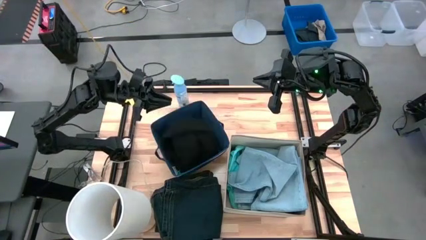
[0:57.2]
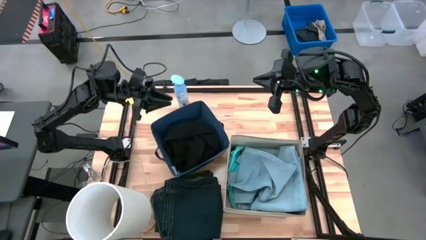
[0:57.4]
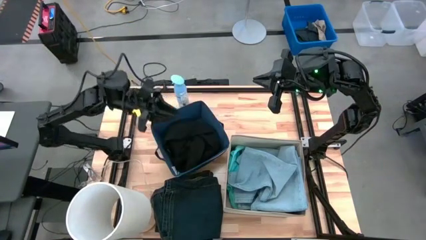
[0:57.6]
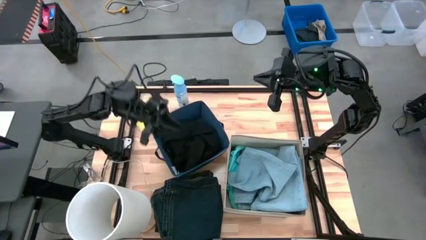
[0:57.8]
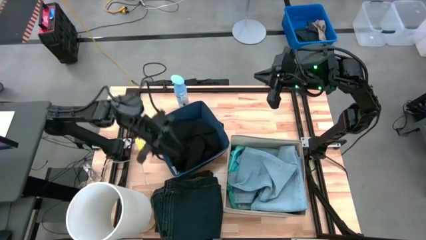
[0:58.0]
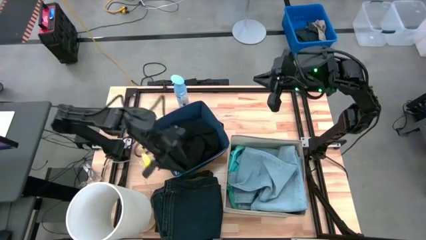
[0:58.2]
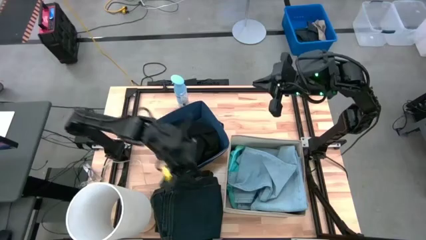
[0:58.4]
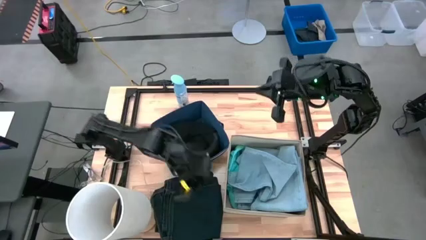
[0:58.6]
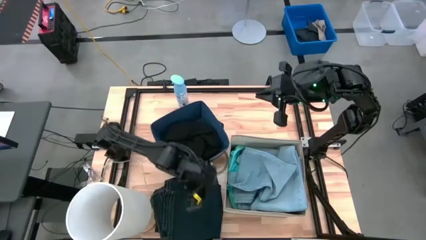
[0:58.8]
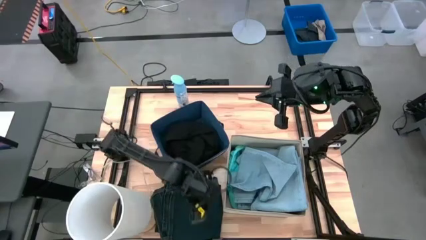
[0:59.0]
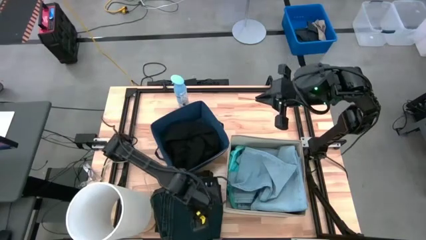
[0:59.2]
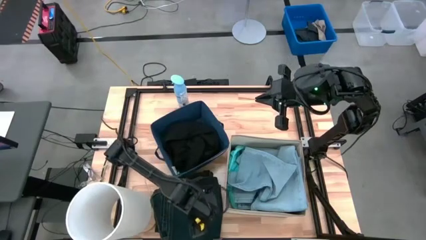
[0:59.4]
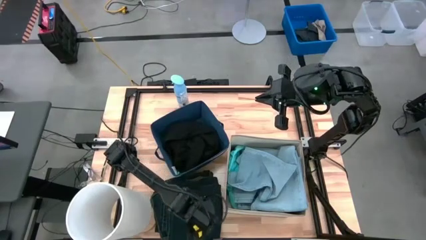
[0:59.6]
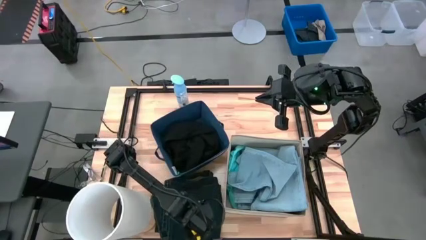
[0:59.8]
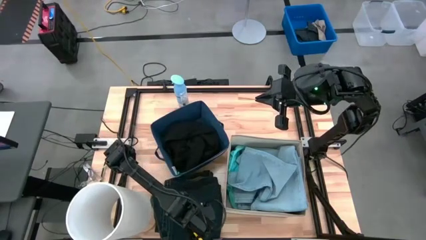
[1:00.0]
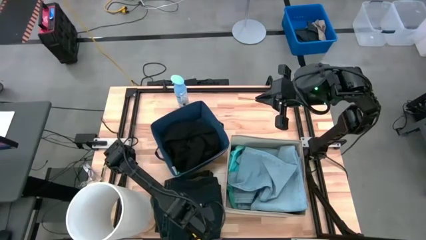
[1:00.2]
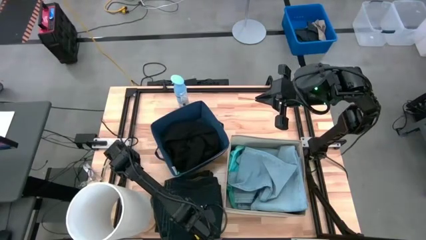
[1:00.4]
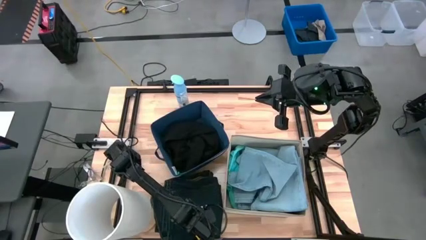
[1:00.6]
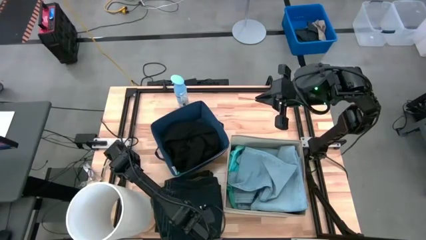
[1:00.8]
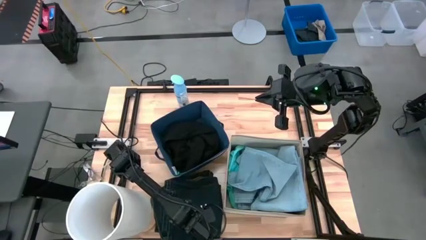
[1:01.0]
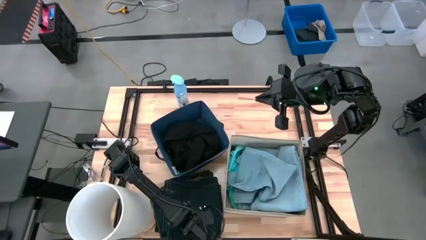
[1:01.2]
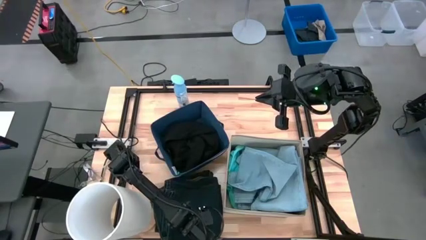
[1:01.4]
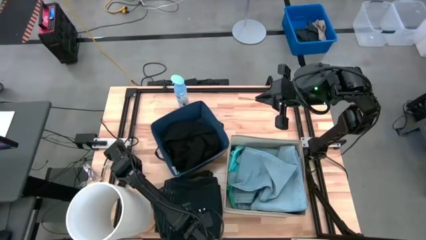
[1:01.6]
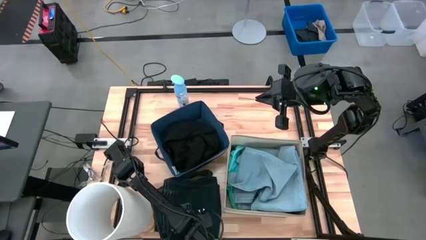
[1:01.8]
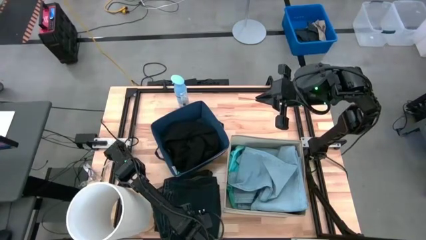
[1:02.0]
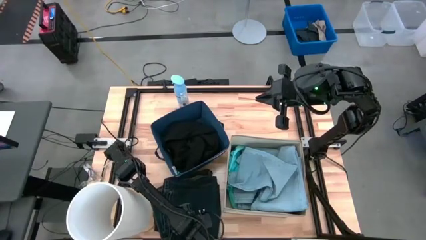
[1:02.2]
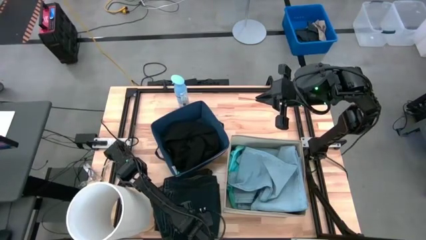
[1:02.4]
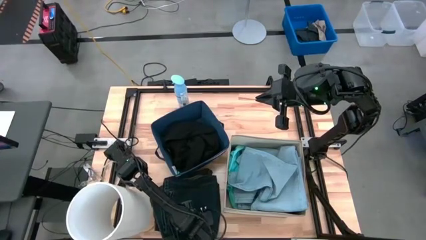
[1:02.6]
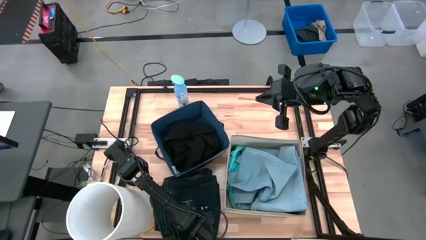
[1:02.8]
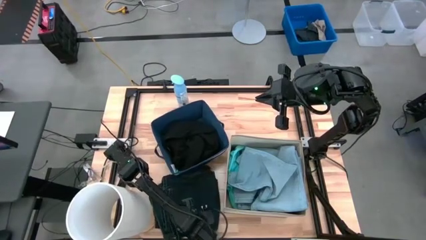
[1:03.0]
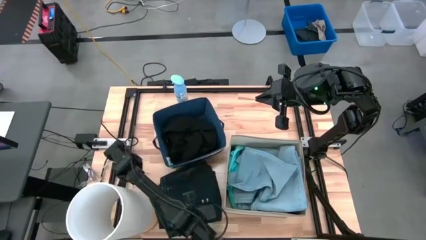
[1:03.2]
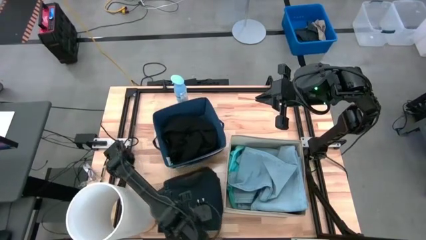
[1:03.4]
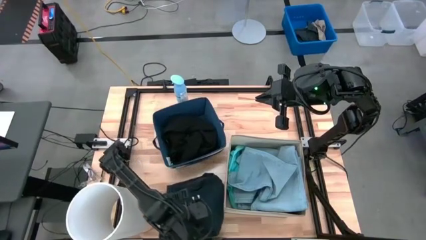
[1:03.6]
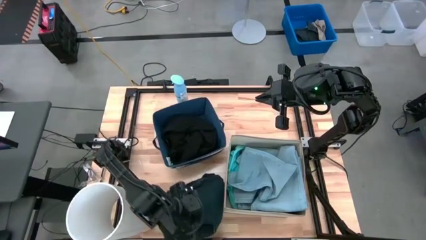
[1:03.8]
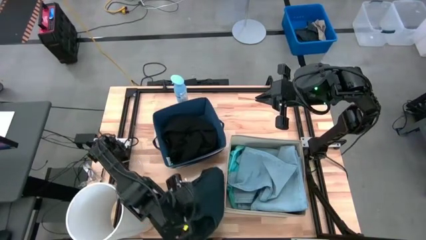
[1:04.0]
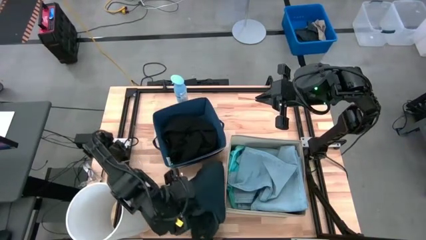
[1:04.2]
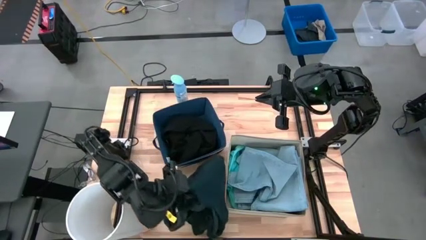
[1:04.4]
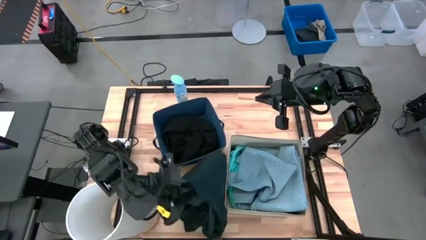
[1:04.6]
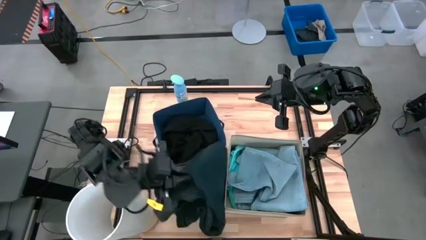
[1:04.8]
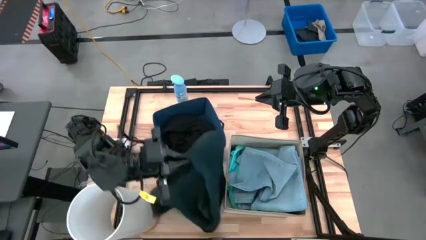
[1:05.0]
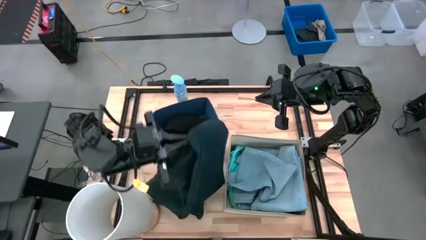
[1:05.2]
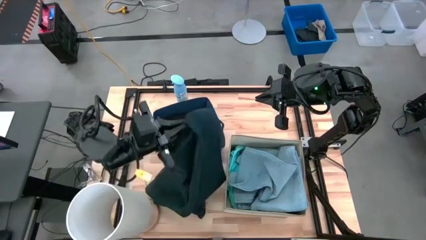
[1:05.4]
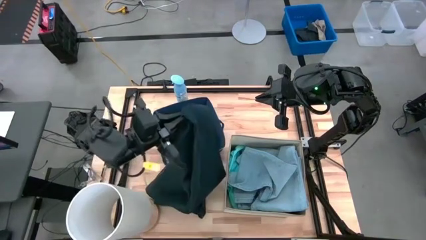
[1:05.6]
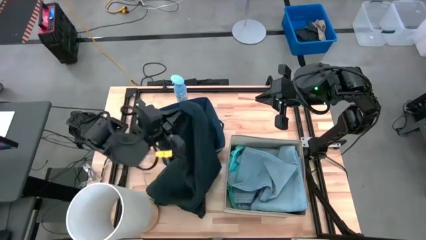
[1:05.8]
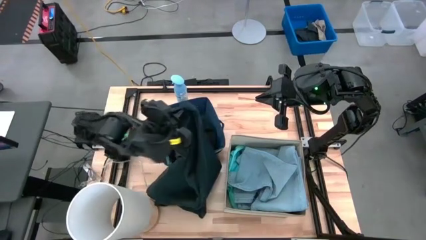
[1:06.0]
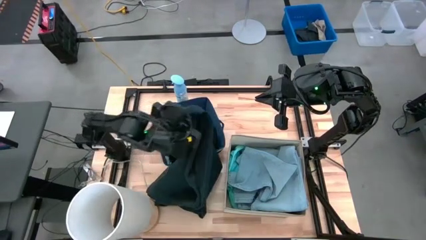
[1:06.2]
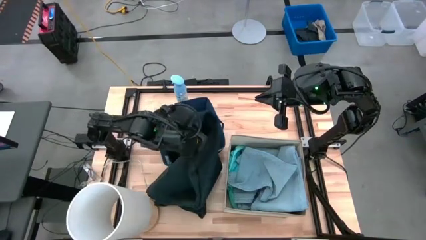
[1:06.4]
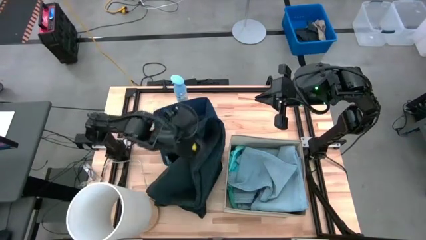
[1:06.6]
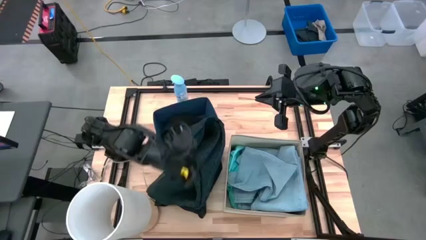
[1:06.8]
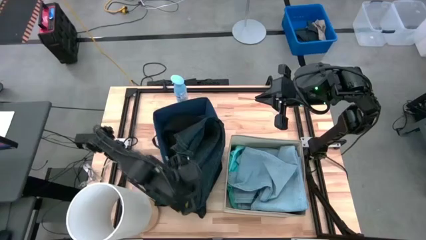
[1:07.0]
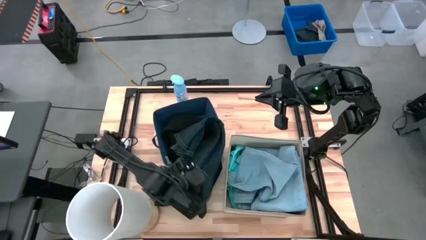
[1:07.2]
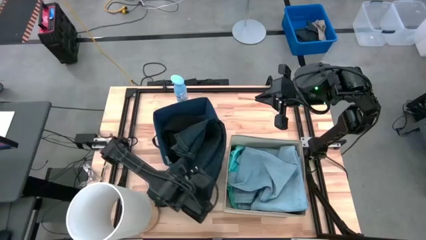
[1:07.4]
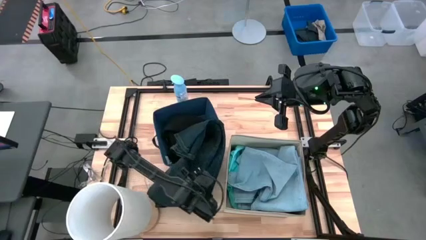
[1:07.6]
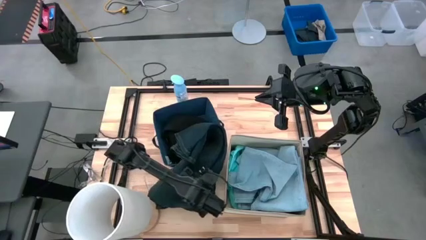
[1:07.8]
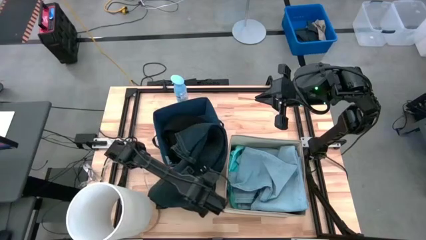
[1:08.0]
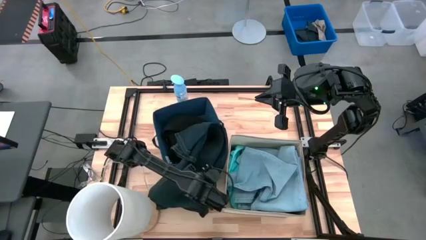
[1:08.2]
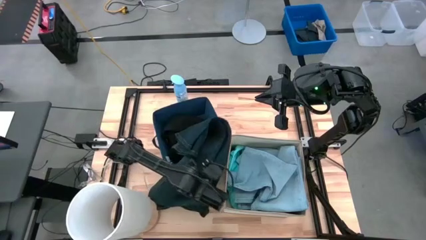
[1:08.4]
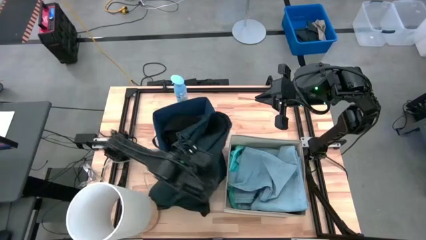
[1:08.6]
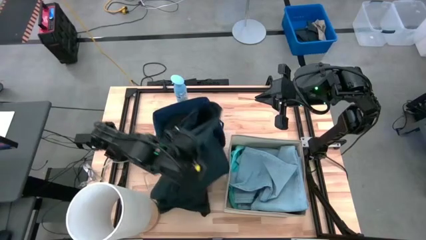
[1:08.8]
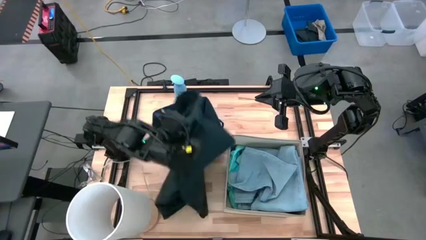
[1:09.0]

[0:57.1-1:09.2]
Task: Sort clothes
Put the dark blue pants into the blue laundry organizer

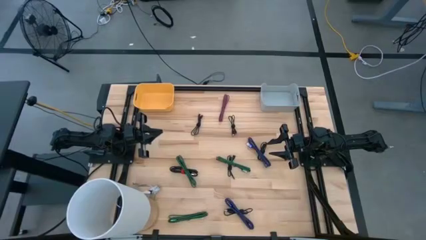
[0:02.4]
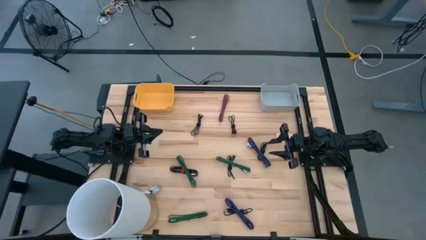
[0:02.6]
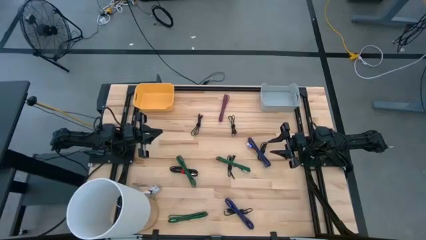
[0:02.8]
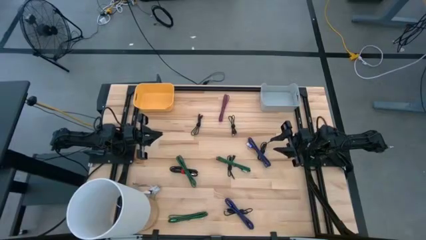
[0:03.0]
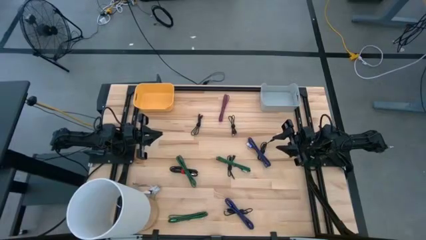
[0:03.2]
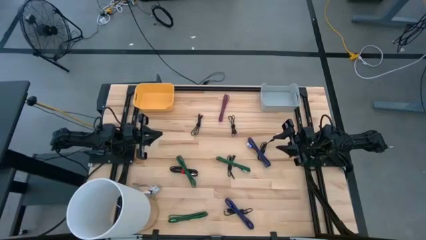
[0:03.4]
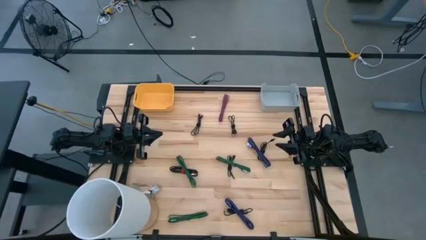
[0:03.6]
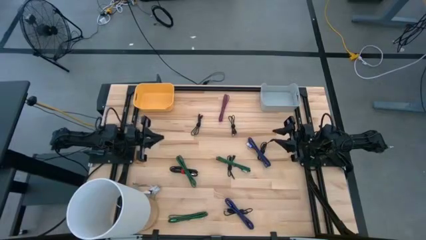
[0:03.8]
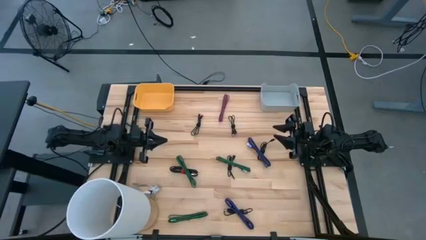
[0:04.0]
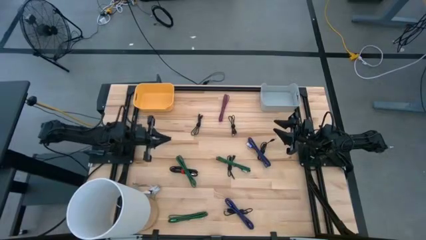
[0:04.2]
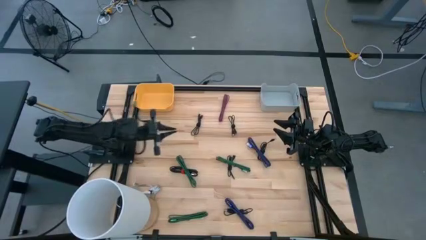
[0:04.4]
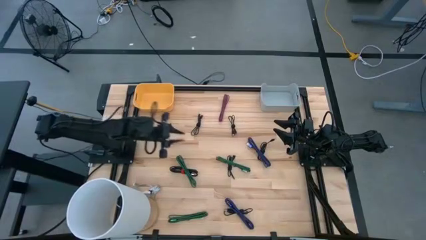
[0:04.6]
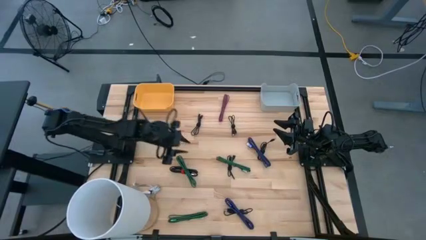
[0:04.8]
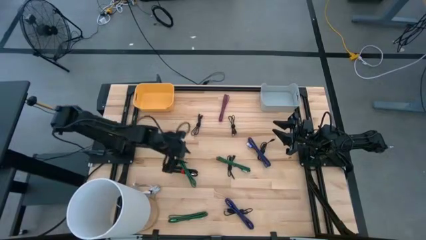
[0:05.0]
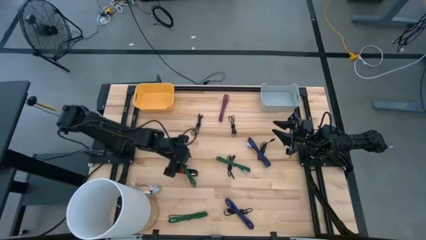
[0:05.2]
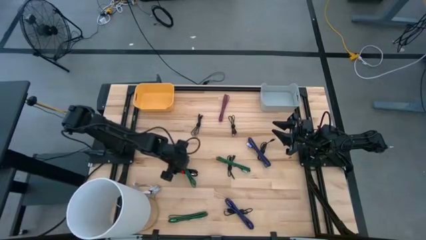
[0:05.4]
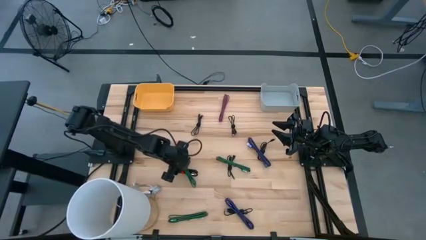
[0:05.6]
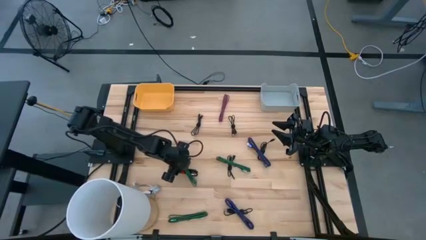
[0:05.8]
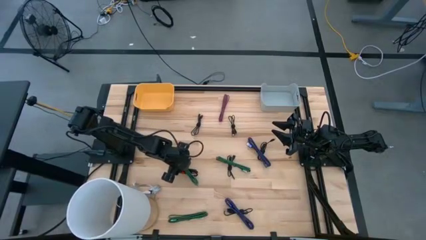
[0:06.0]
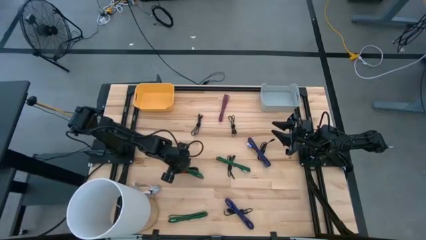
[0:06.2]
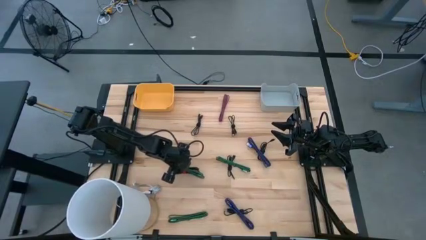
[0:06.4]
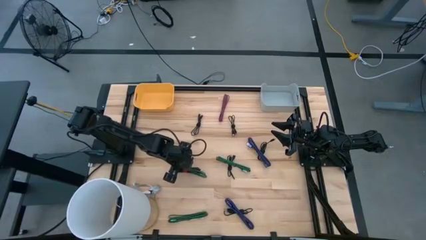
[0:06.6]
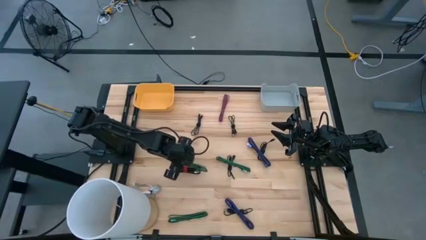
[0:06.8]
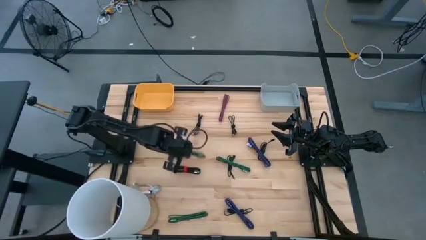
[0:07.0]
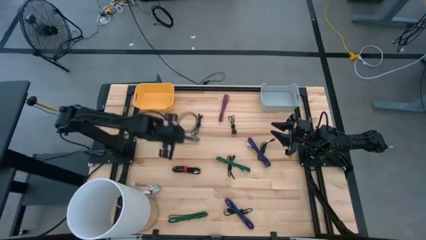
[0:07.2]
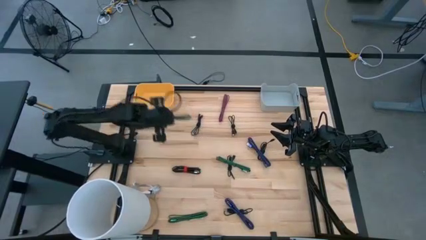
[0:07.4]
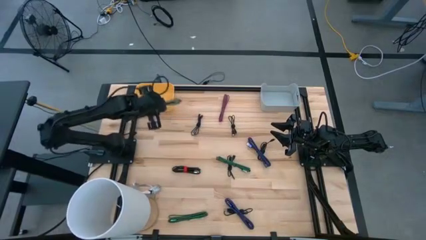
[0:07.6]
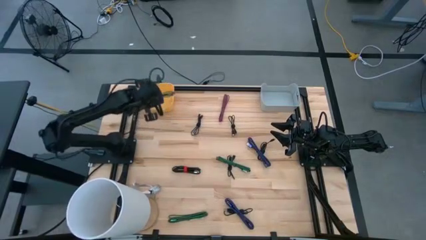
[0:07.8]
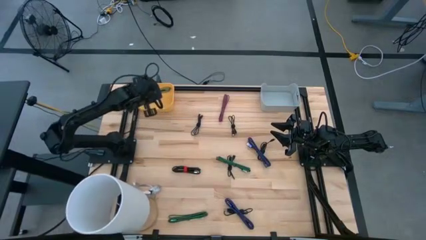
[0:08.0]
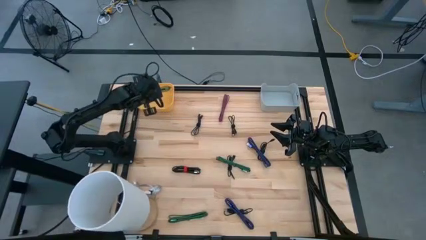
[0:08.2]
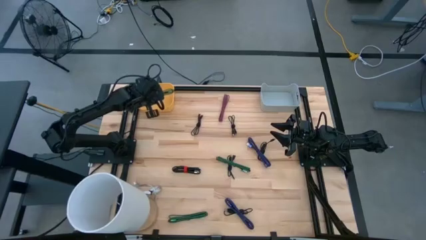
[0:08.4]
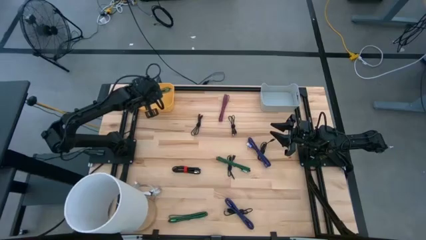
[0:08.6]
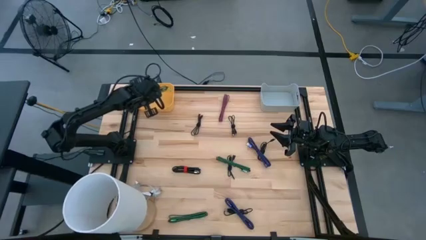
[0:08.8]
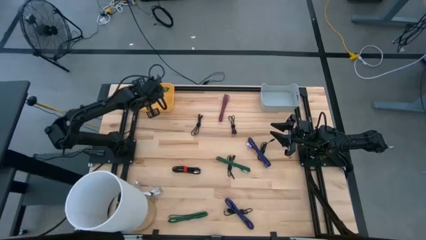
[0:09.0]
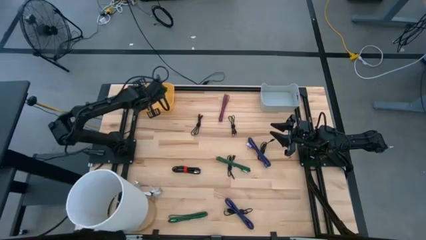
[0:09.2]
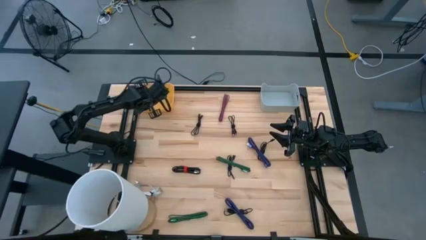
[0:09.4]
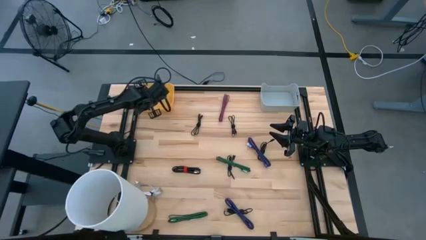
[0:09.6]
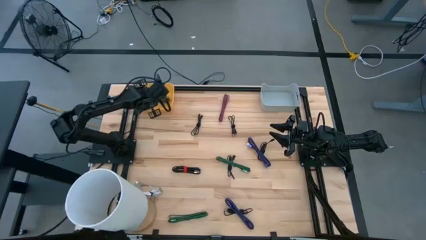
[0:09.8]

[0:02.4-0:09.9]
Task: Pick & Place USB Port
Put the green charger cable into the yellow bin
